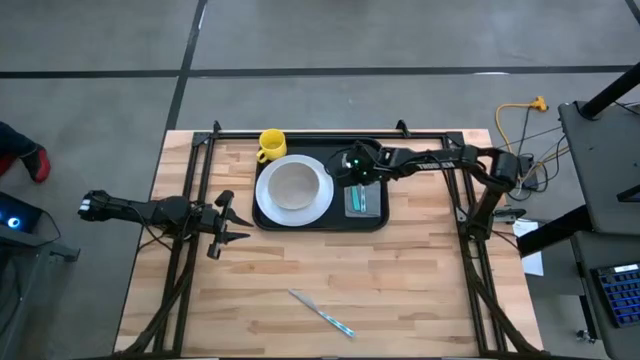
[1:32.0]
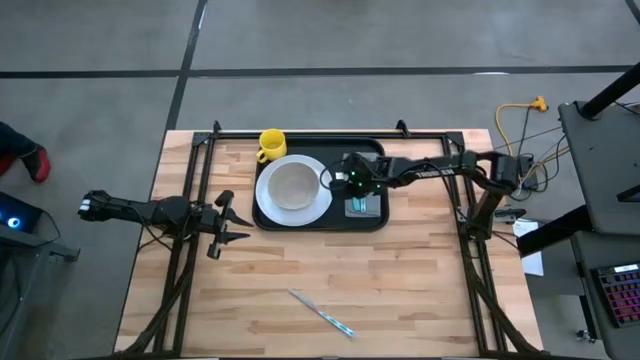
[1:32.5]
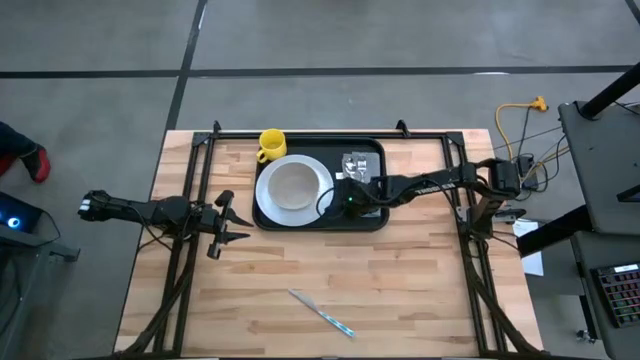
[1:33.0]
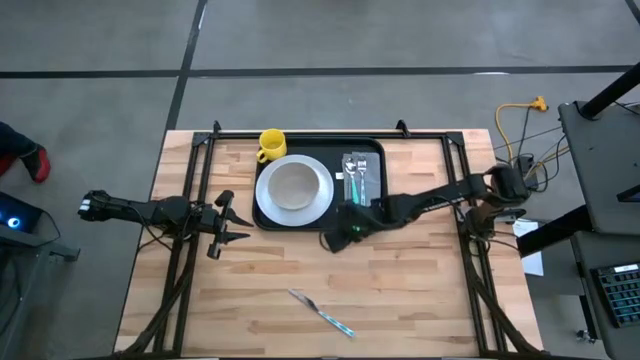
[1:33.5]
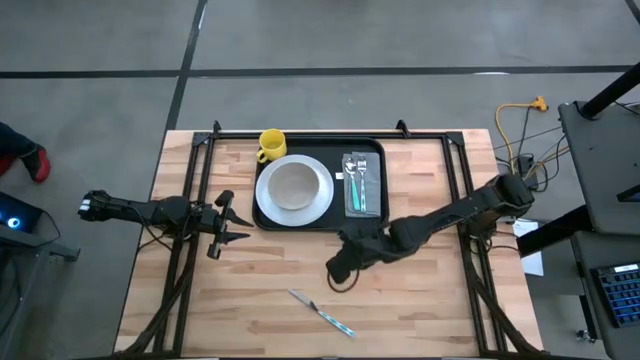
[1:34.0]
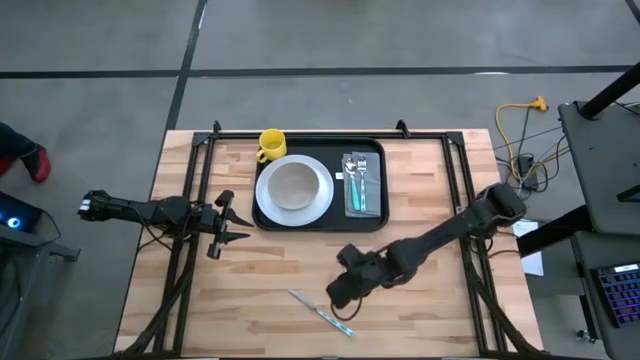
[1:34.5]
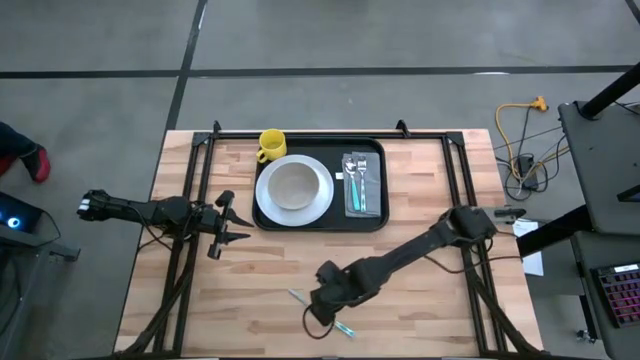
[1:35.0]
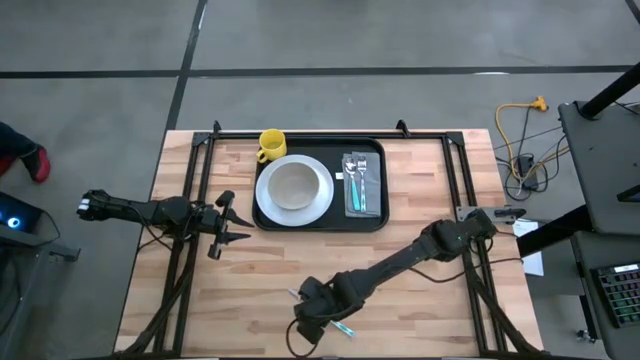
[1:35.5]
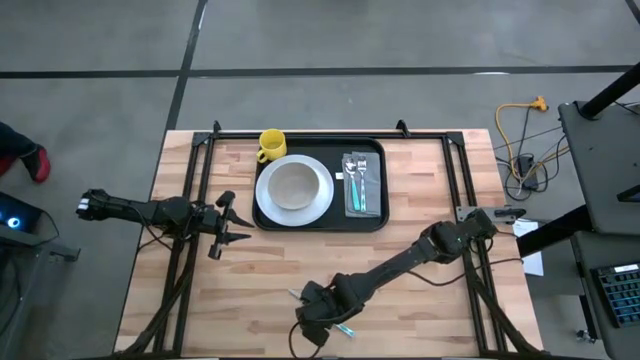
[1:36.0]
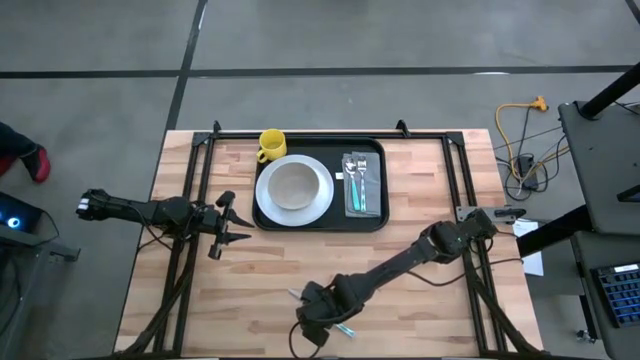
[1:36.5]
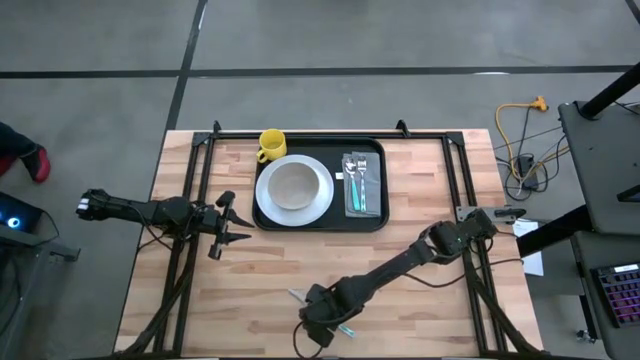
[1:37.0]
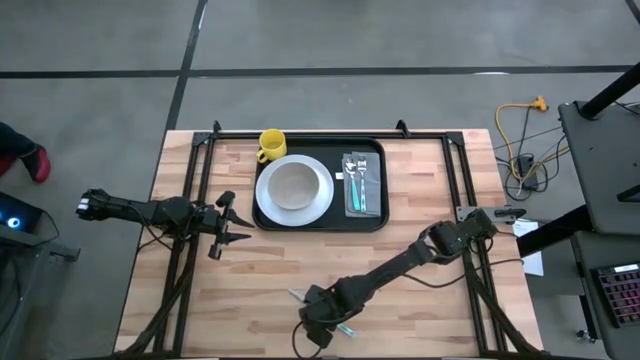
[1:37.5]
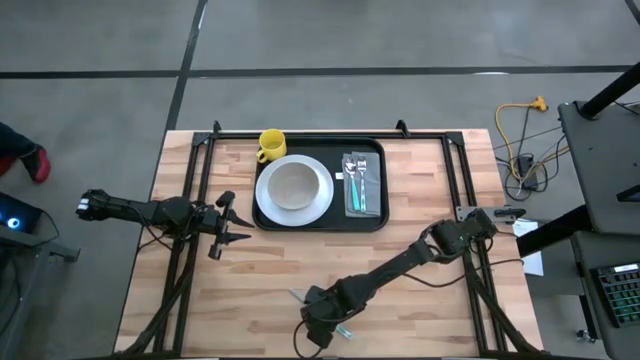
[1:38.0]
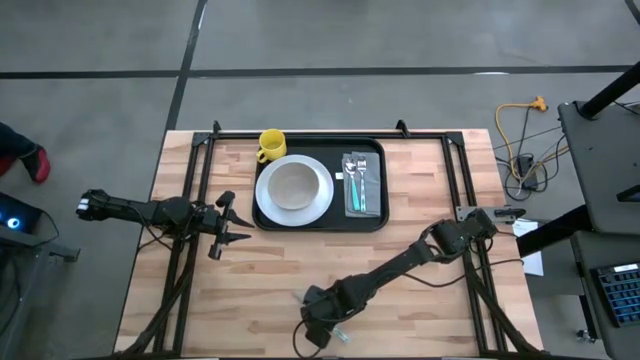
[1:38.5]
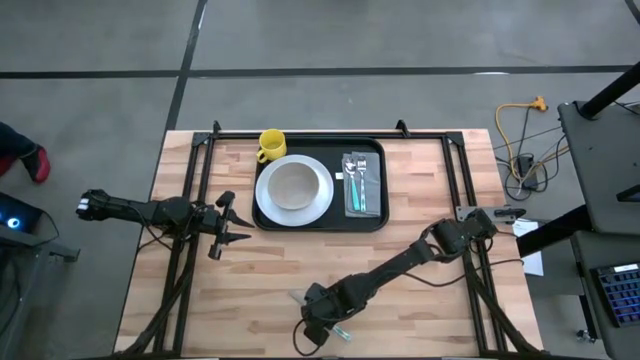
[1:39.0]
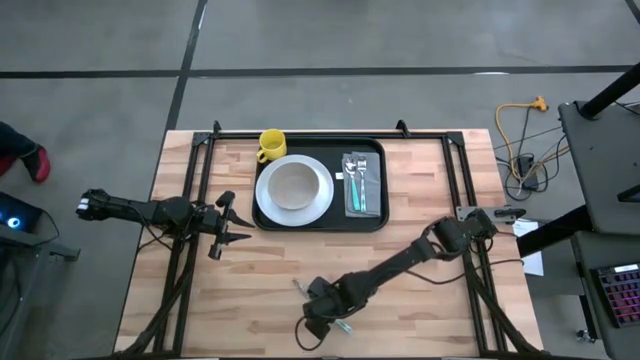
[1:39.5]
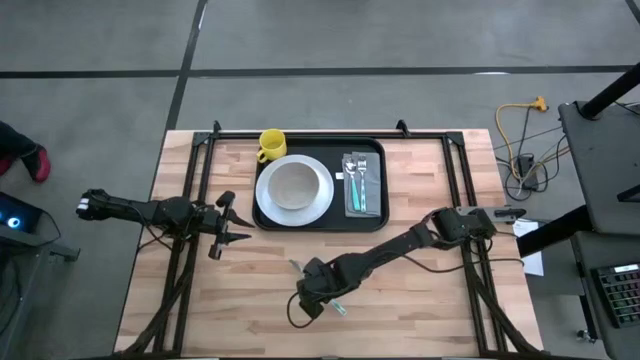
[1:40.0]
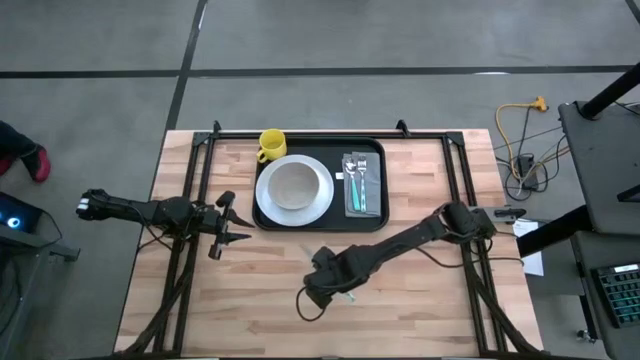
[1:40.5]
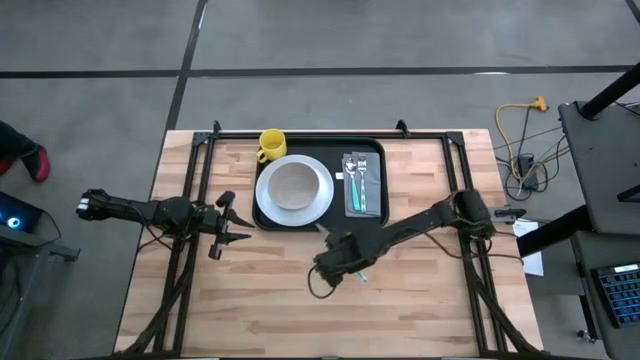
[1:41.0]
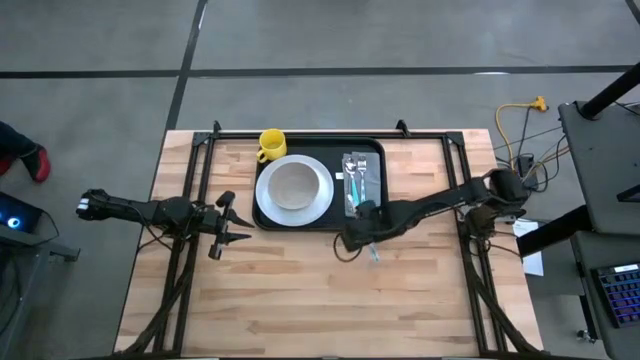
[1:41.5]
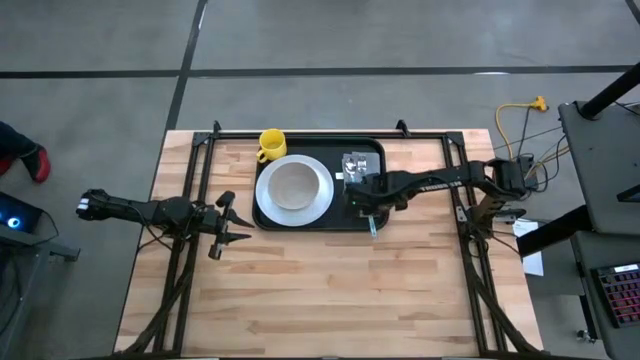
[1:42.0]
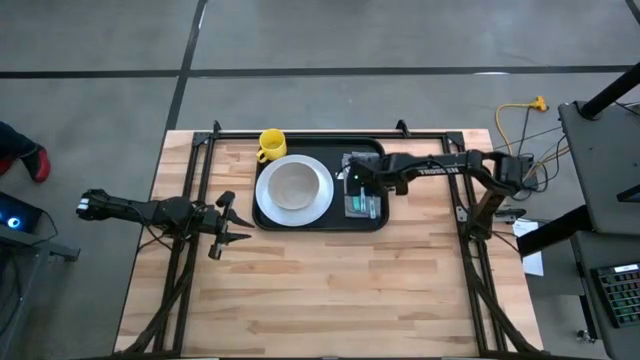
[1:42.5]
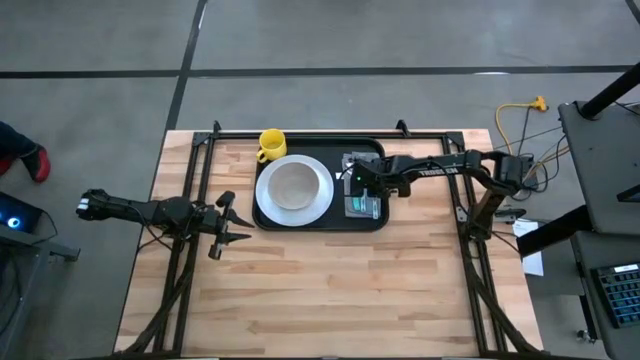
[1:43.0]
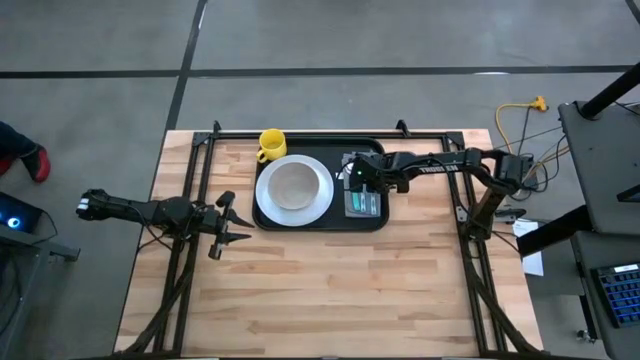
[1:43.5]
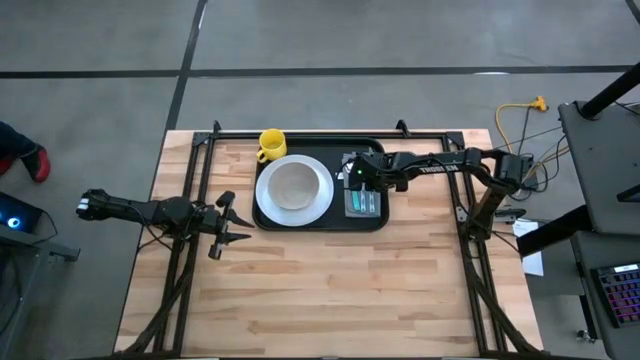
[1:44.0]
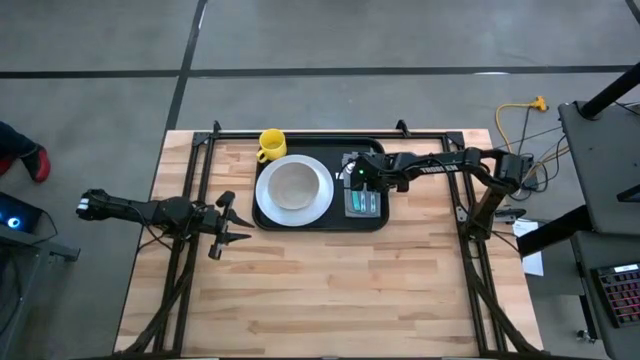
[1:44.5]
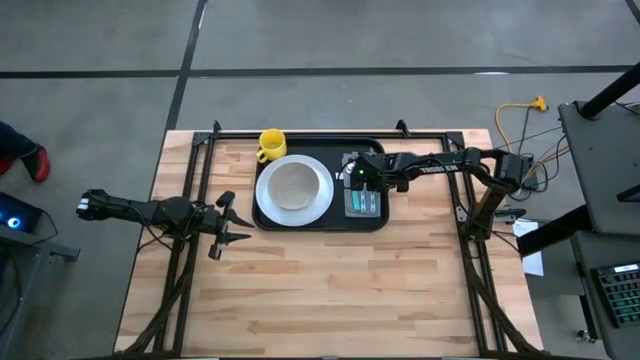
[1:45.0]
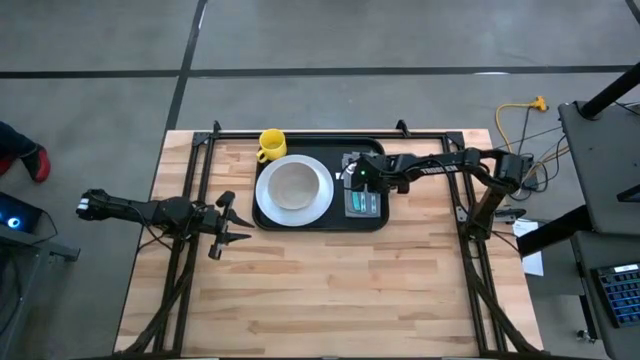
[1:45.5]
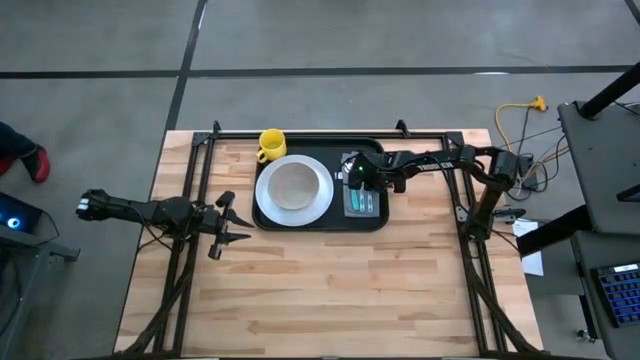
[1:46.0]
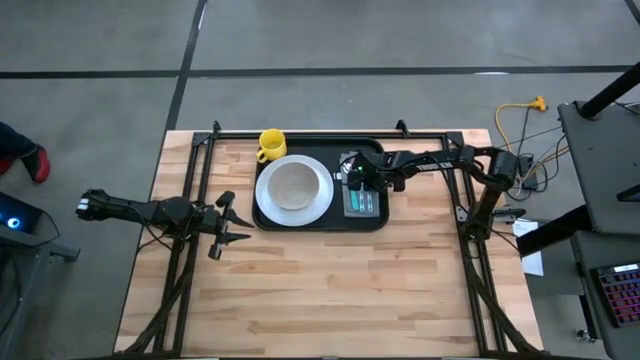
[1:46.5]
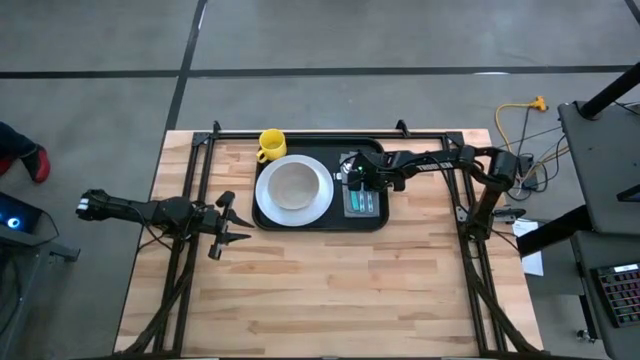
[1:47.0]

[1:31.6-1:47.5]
Task: Set up tray
Put the white knife on top of the napkin beside the white fork

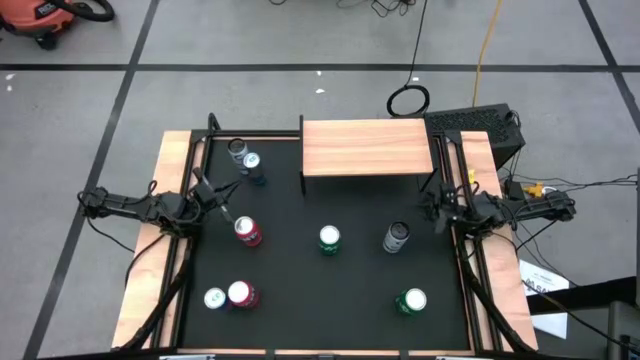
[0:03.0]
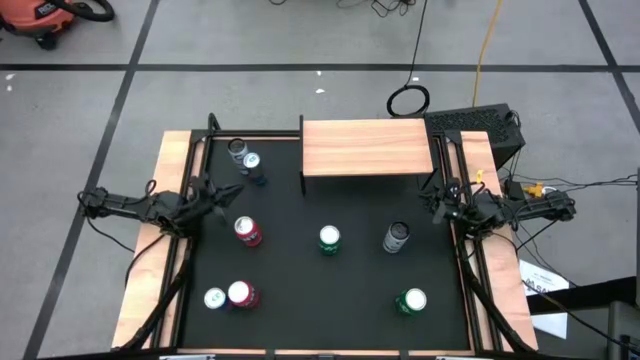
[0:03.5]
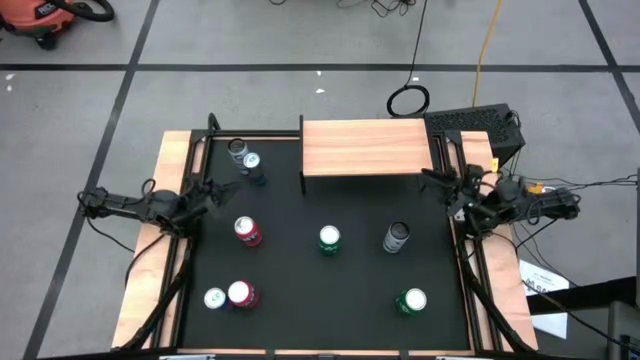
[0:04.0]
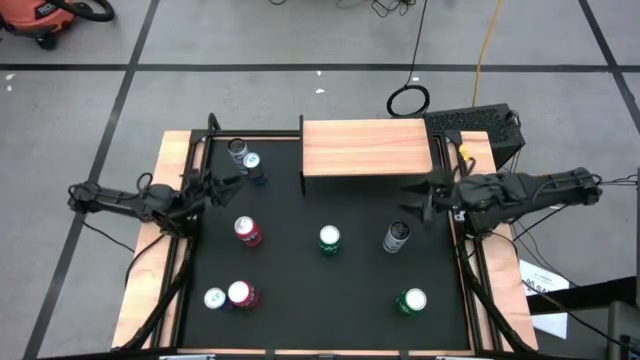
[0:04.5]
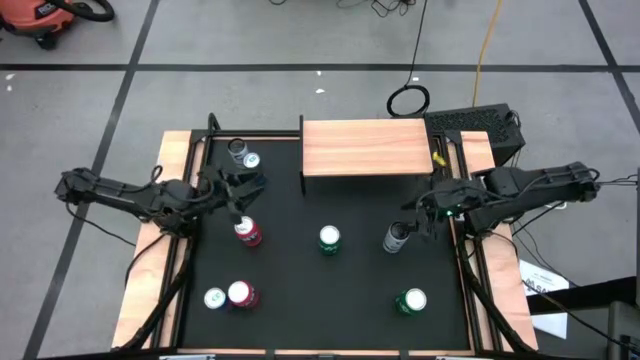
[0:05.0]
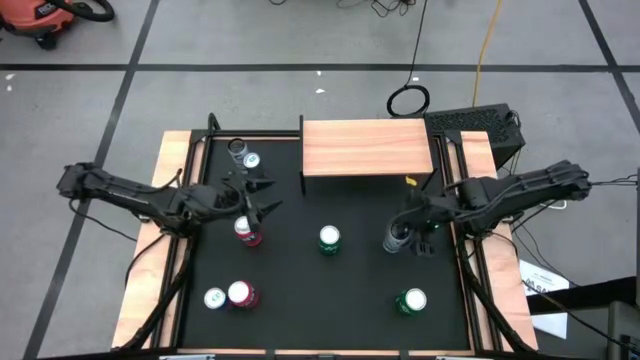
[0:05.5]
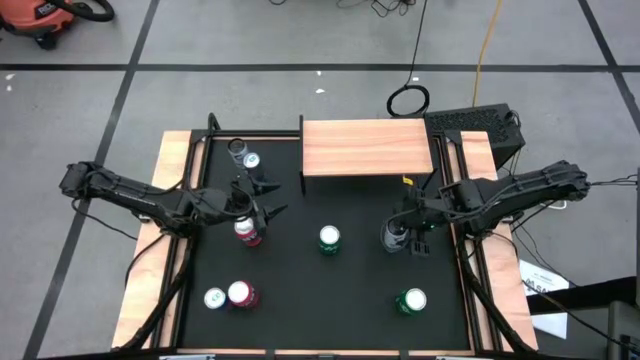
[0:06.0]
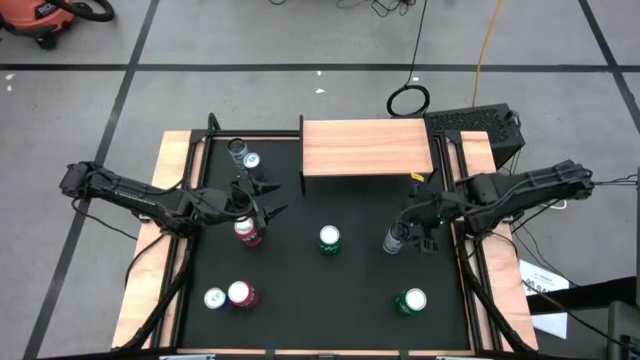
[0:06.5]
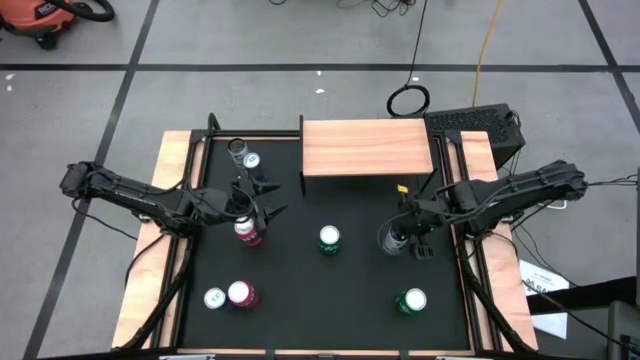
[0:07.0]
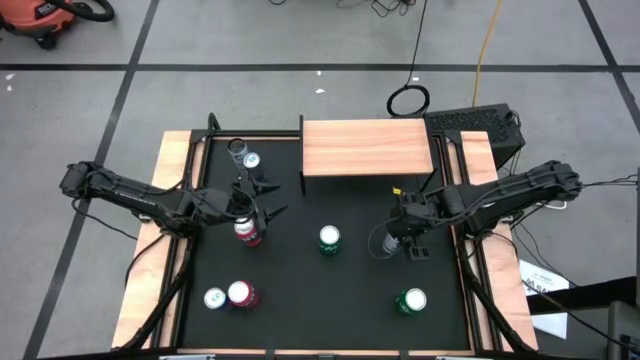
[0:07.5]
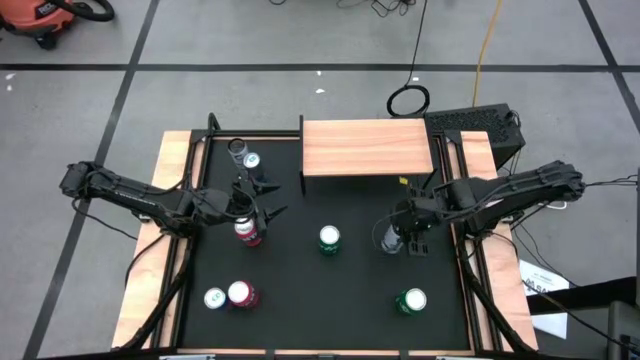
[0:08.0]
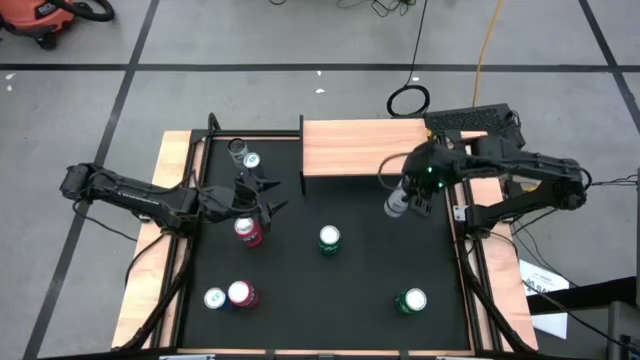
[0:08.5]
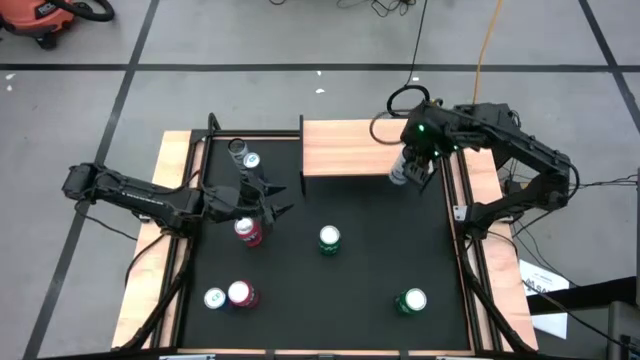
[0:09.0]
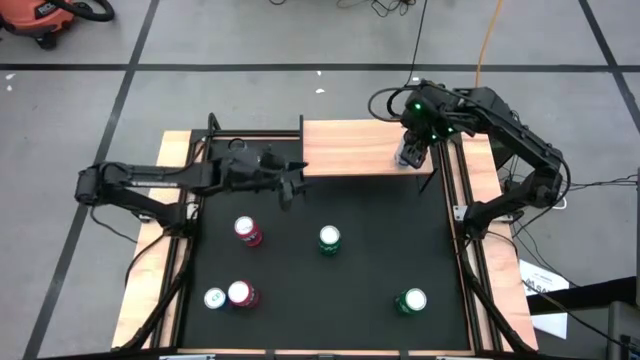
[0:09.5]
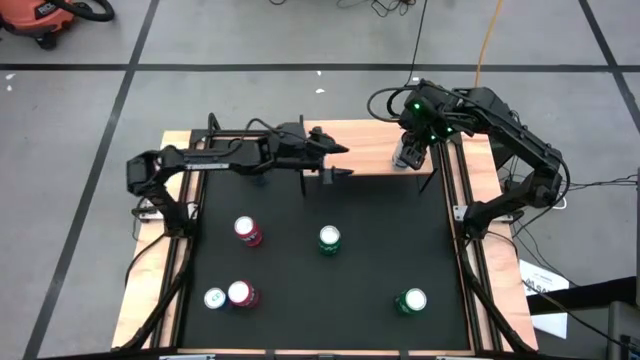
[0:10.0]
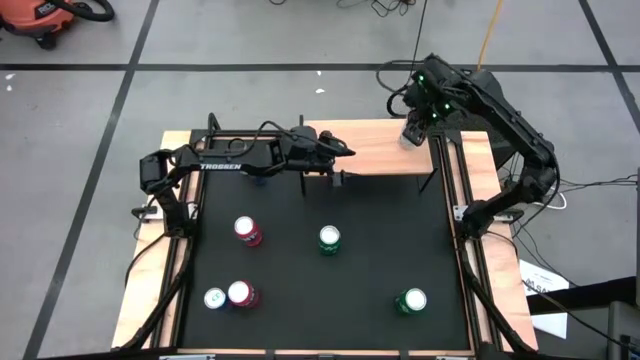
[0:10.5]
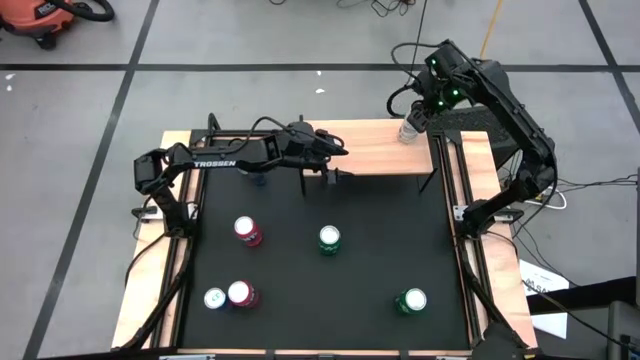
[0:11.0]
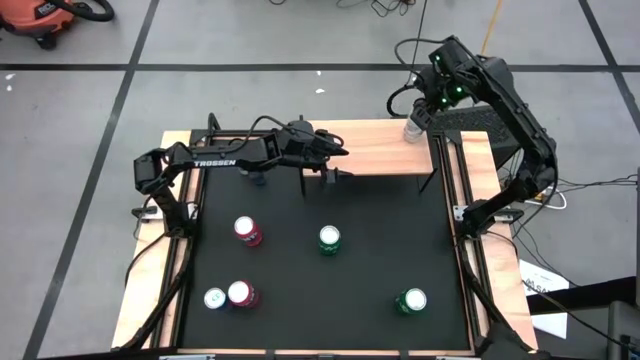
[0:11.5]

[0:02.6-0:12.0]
Task: Place canned beverage on shelf
Put the bottom white blue soda can on the shelf
